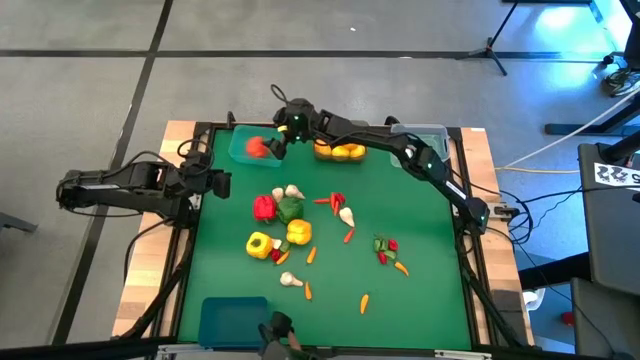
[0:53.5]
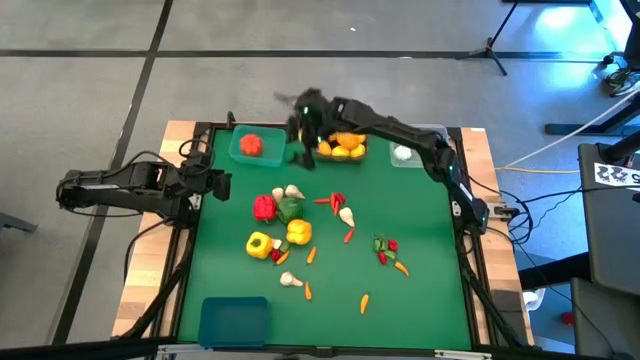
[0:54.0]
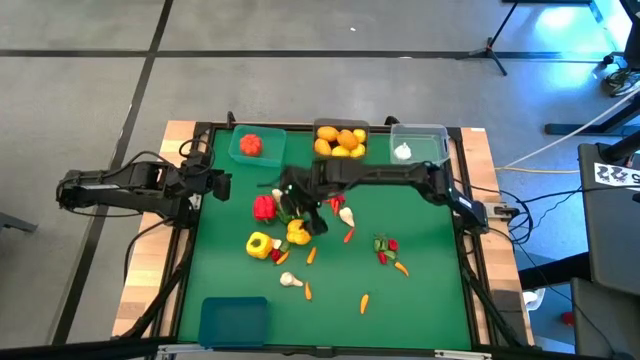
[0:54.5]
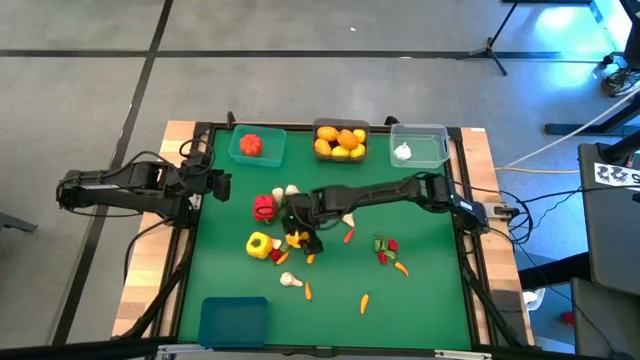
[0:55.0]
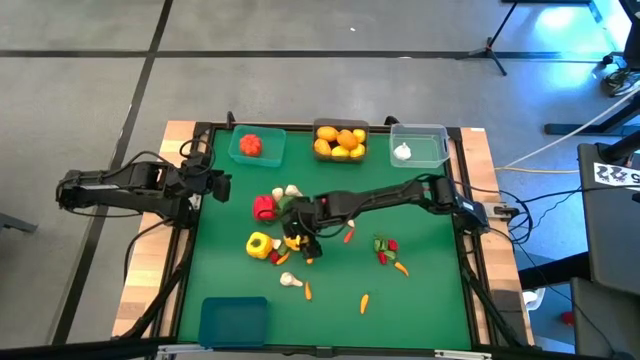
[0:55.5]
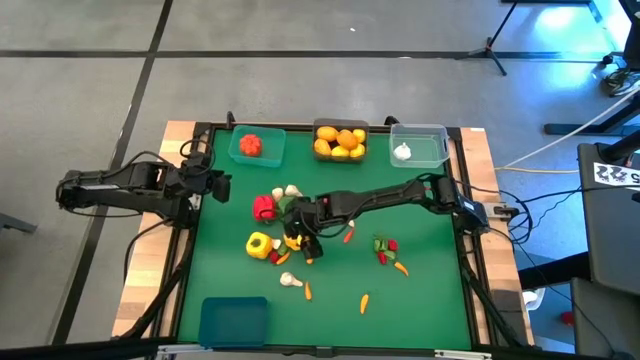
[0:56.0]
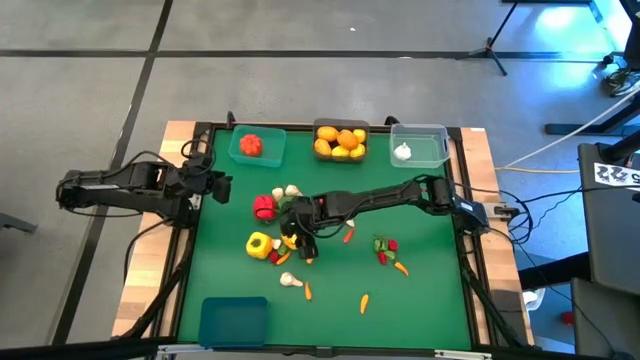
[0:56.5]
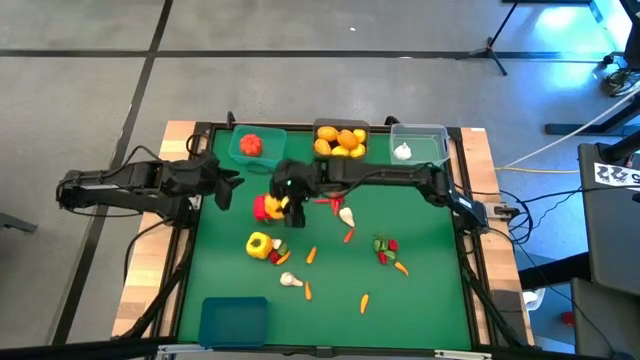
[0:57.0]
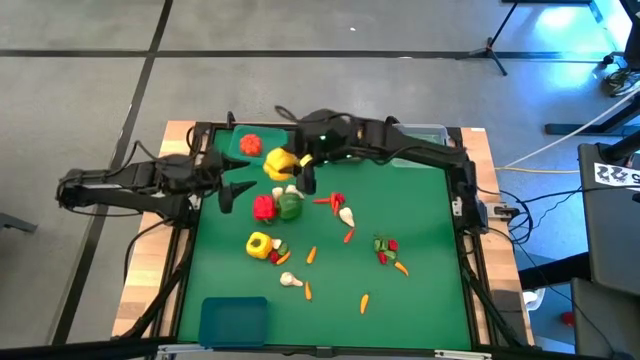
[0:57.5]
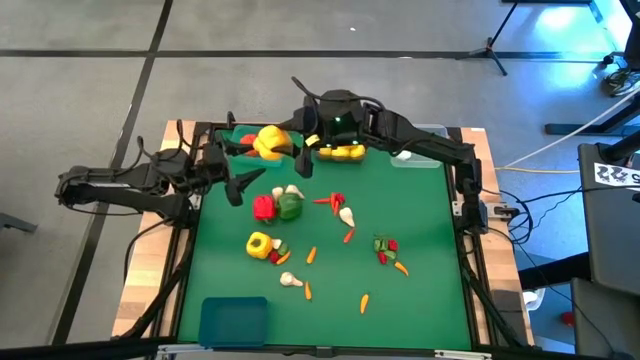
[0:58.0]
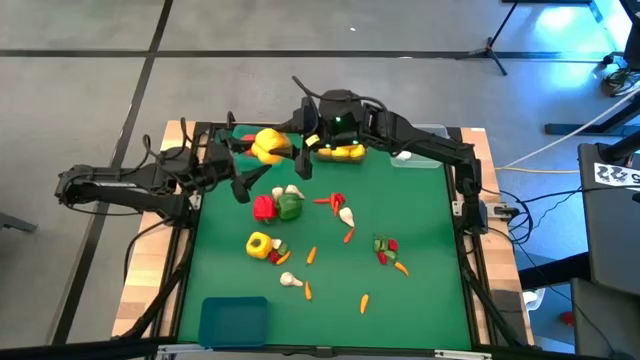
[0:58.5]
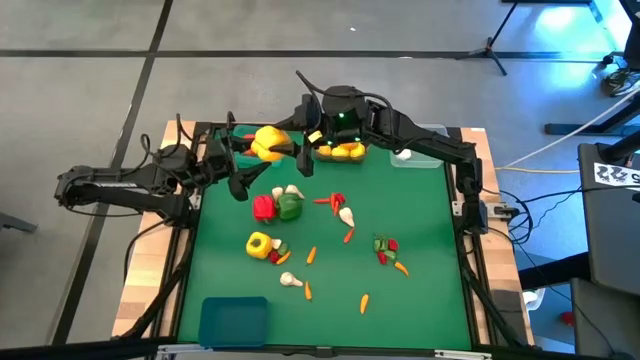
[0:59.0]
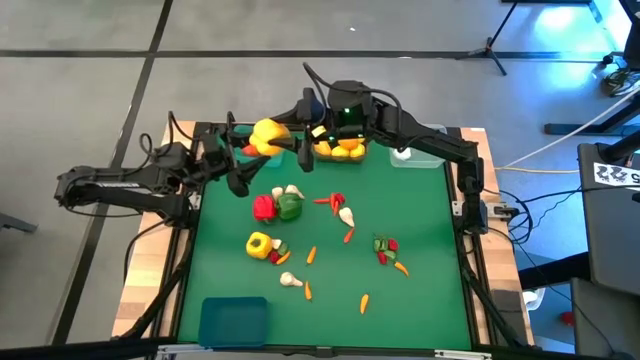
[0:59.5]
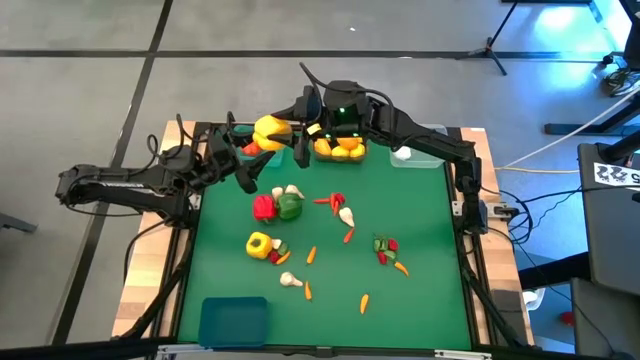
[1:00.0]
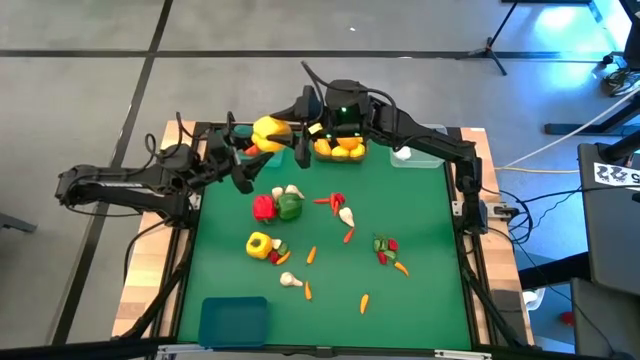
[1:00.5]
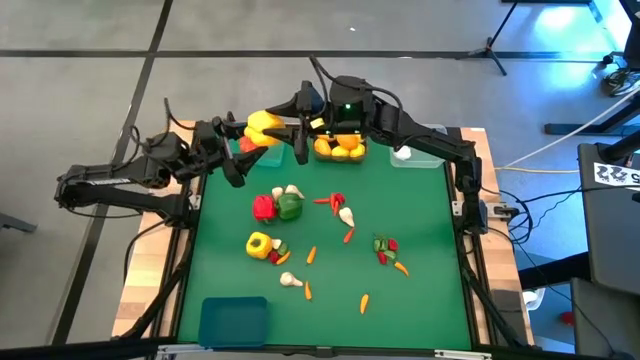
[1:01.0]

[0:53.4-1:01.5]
Task: Sort produce into baskets
Put the yellow bell pepper into the light blue bin

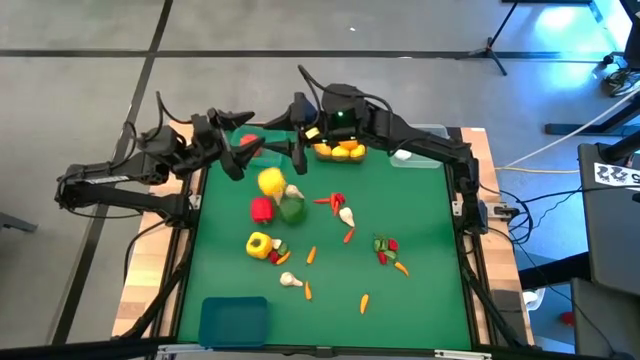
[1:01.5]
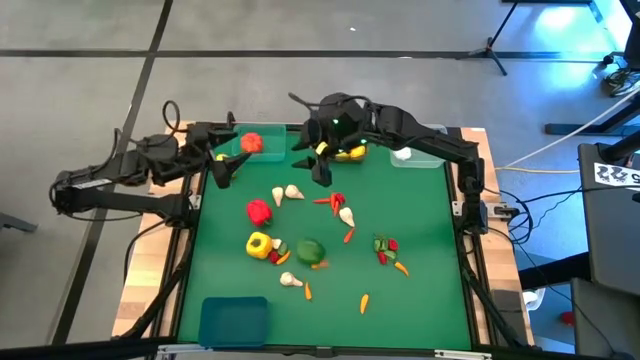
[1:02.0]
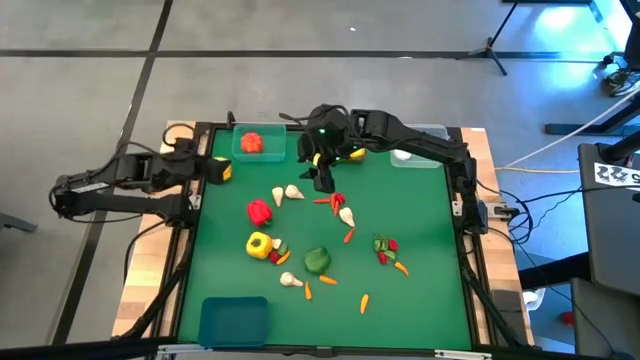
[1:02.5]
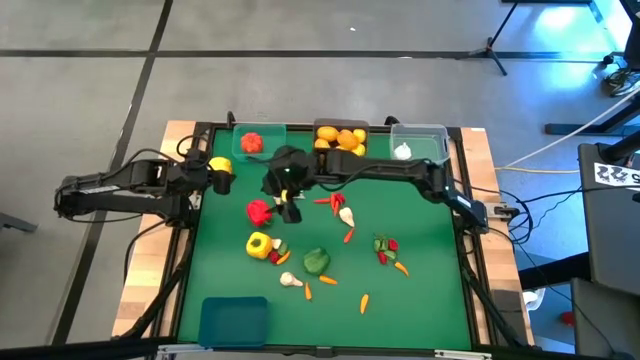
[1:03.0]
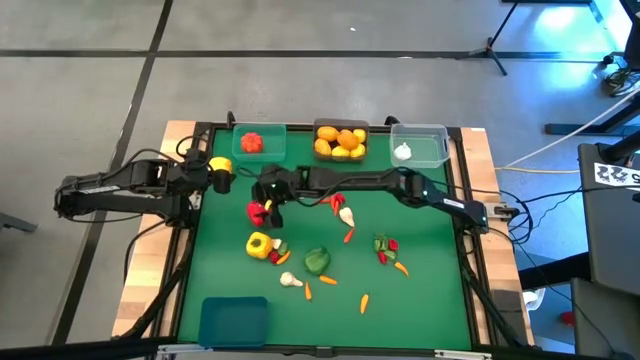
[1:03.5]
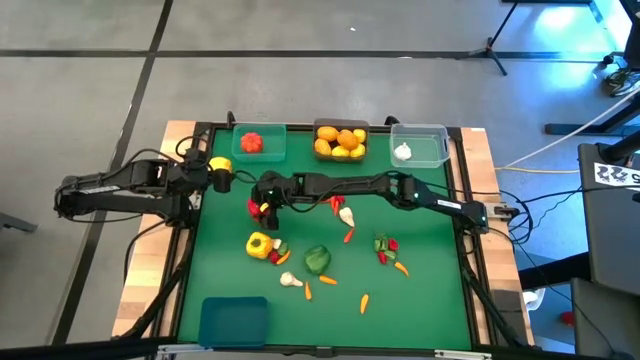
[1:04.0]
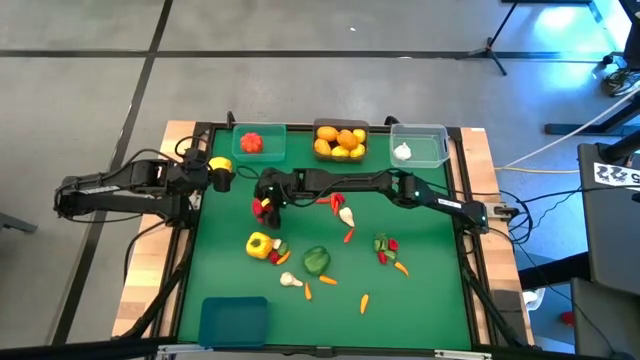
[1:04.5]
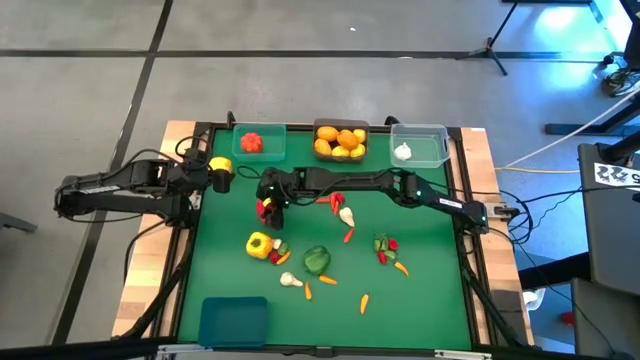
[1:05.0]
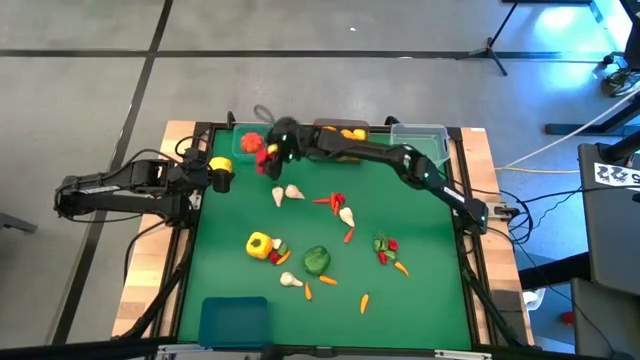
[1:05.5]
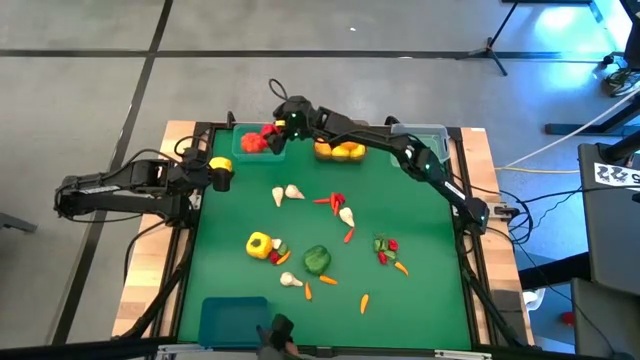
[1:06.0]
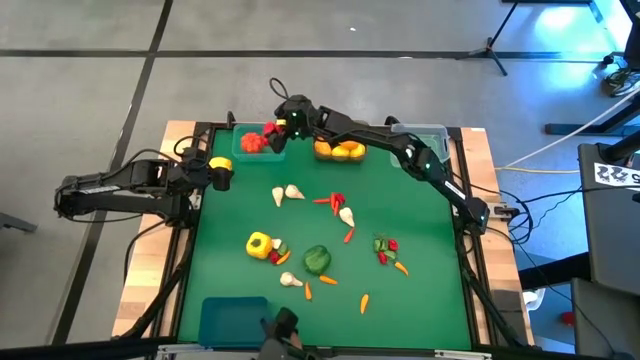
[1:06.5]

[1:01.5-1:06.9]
Put the red bell pepper into the light blue bin

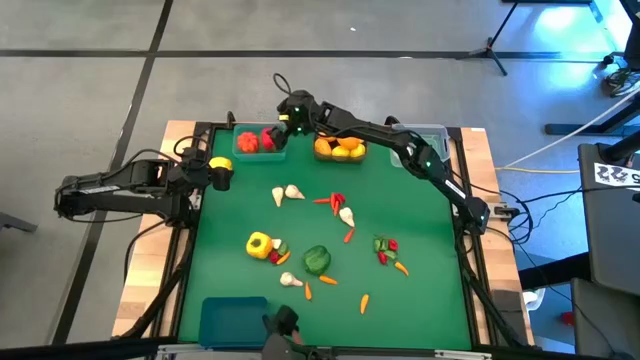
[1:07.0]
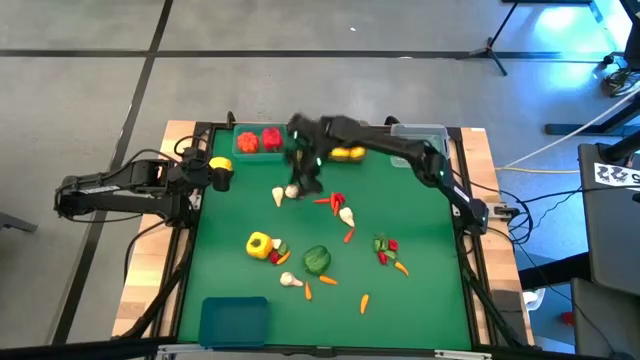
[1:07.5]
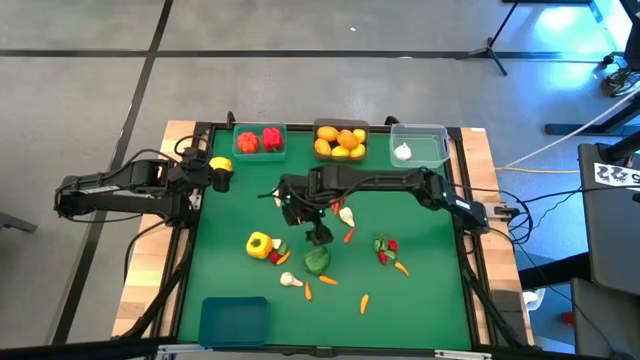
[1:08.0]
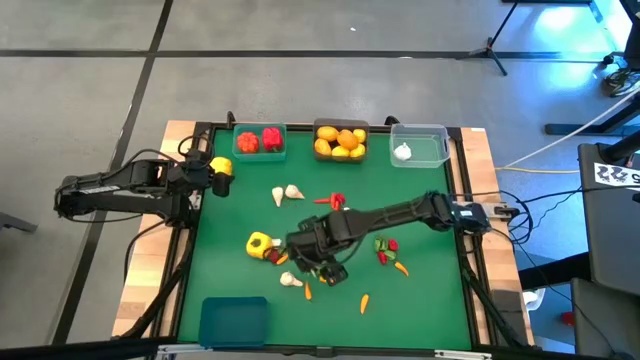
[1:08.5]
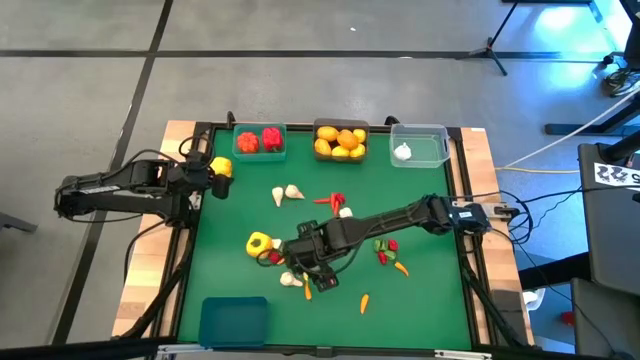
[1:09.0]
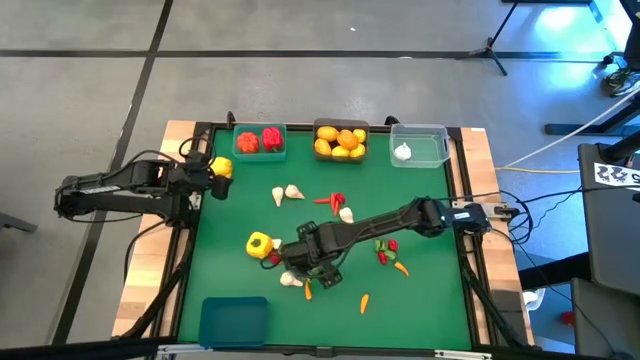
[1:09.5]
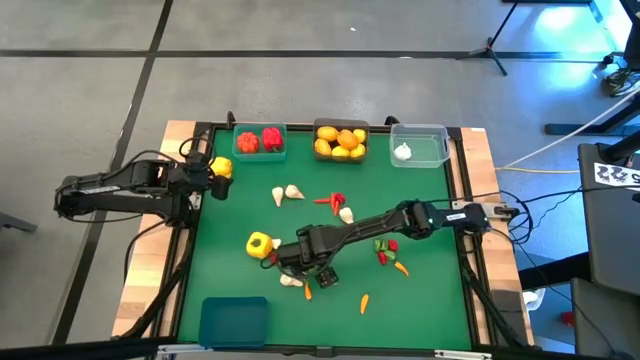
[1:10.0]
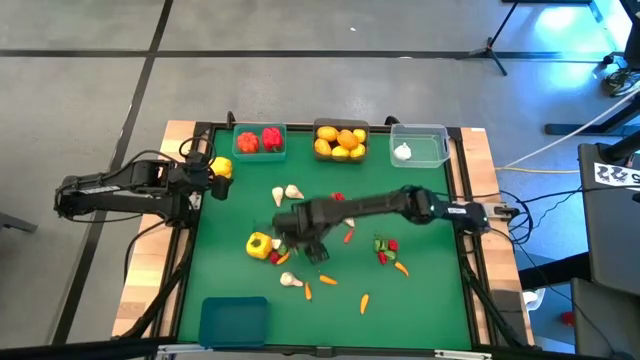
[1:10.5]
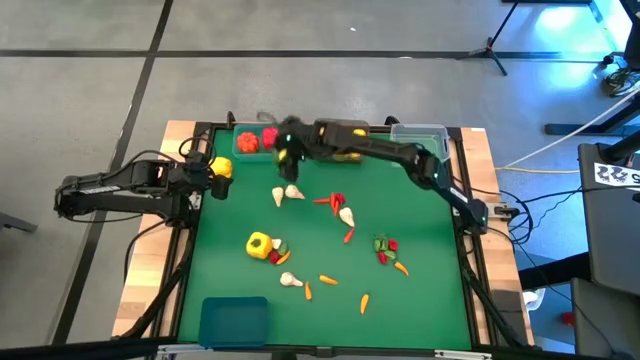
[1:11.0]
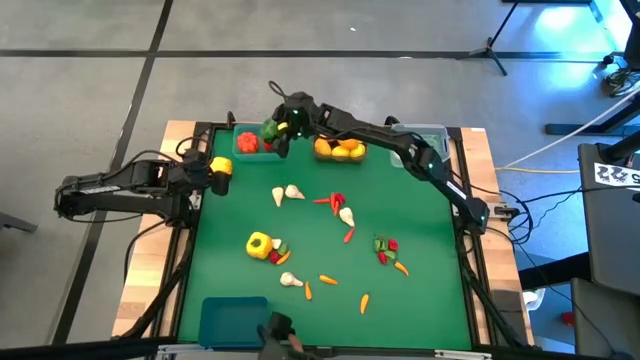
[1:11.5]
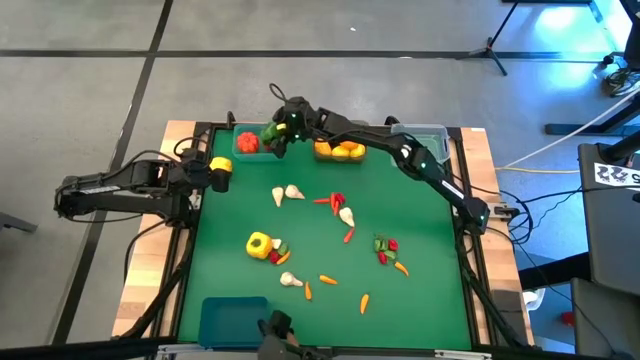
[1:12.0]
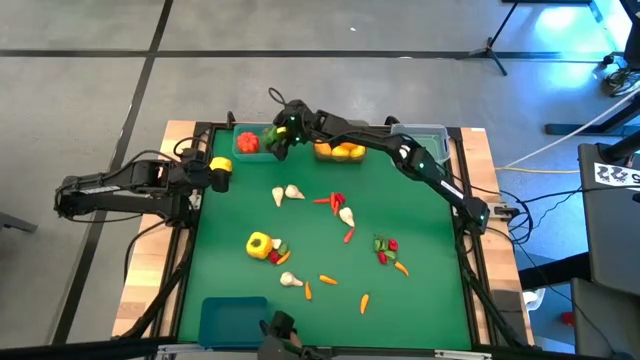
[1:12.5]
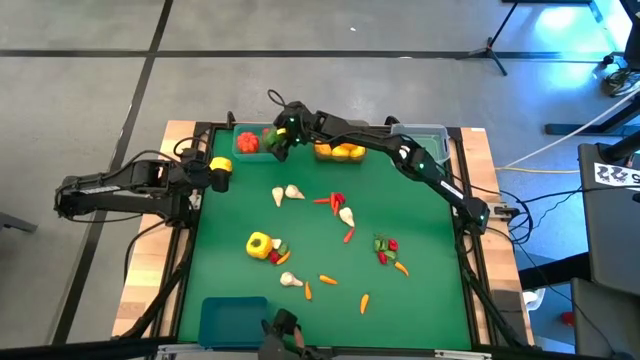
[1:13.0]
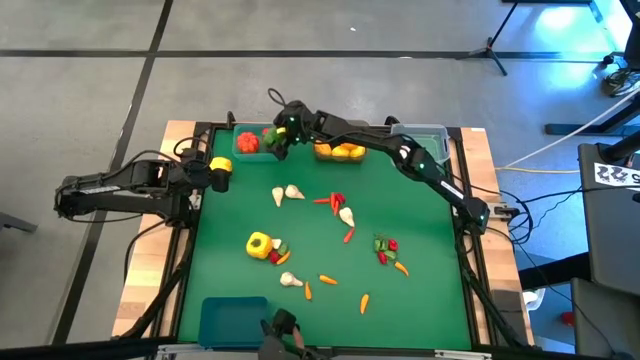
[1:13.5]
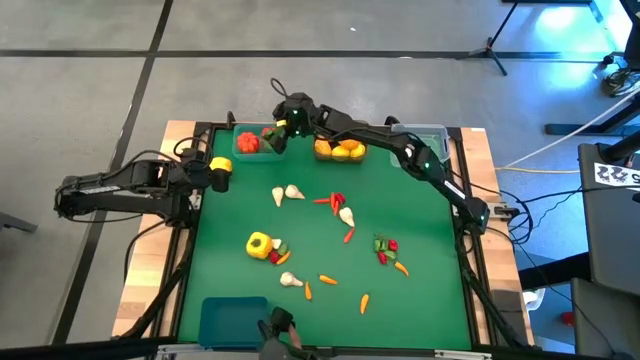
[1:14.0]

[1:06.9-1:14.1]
Put the green bell pepper into the light blue bin
